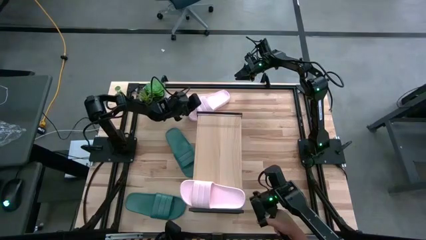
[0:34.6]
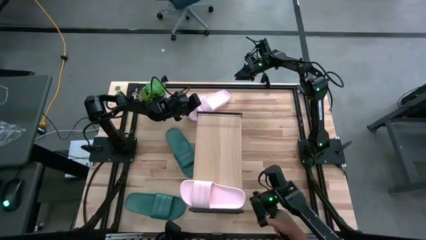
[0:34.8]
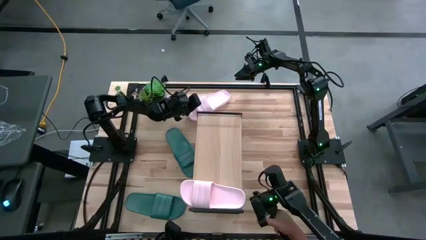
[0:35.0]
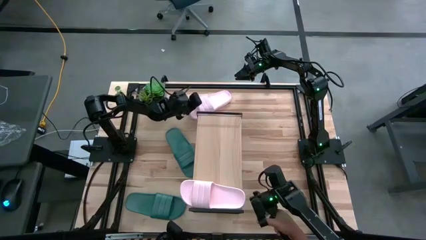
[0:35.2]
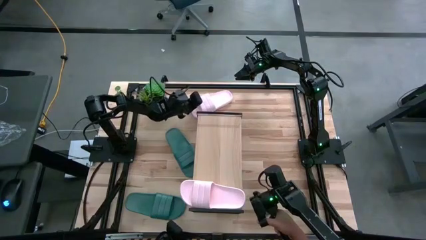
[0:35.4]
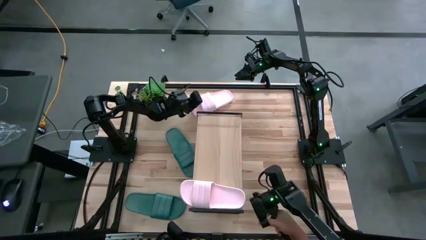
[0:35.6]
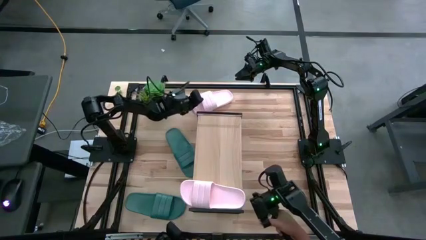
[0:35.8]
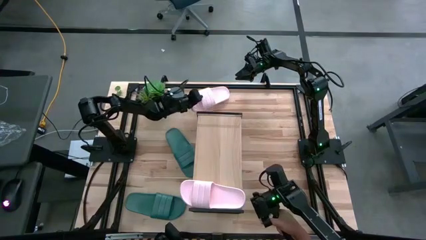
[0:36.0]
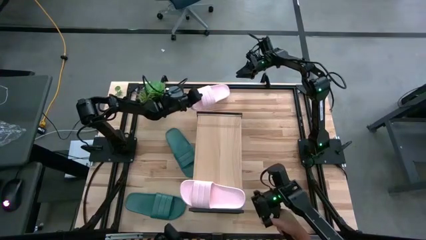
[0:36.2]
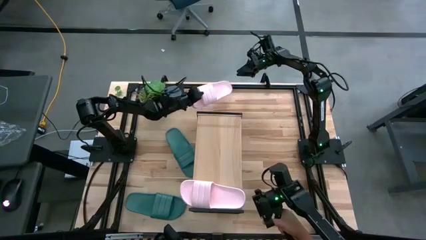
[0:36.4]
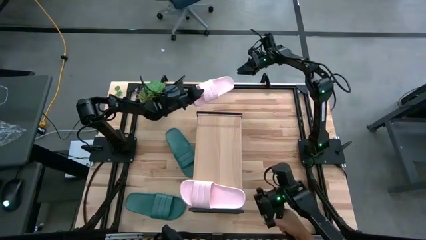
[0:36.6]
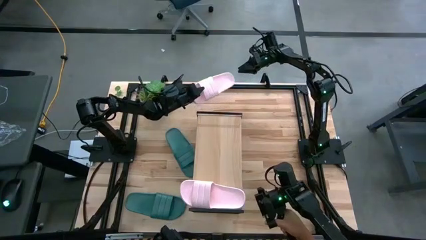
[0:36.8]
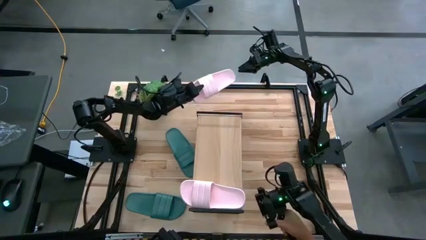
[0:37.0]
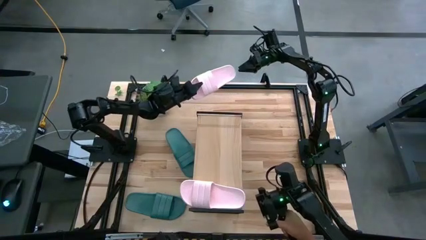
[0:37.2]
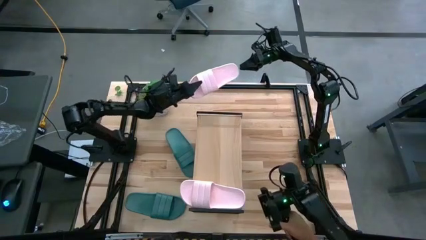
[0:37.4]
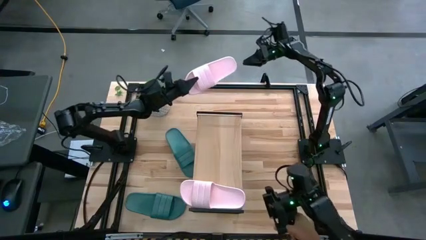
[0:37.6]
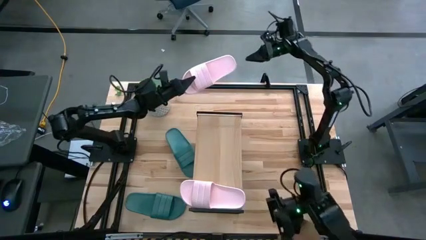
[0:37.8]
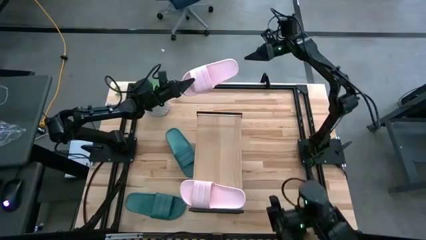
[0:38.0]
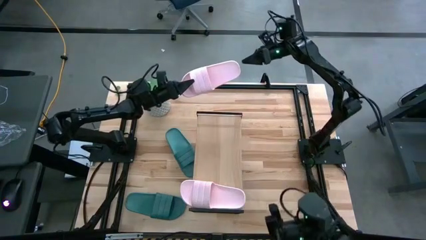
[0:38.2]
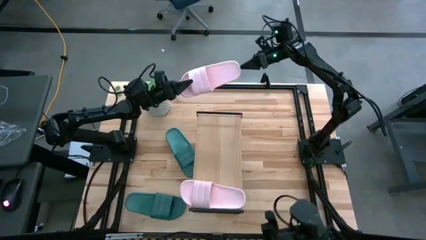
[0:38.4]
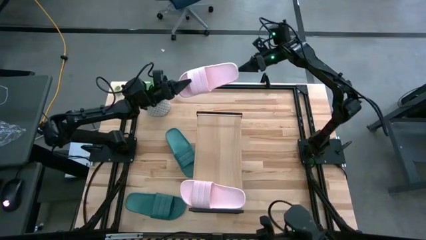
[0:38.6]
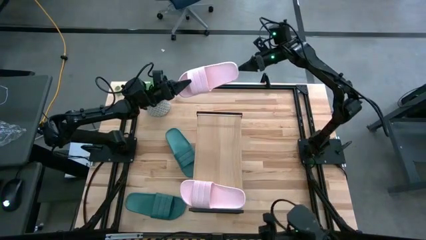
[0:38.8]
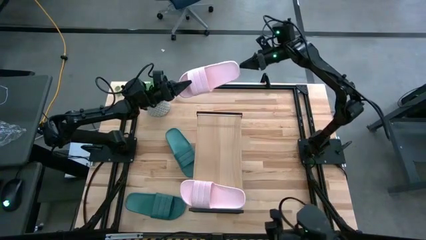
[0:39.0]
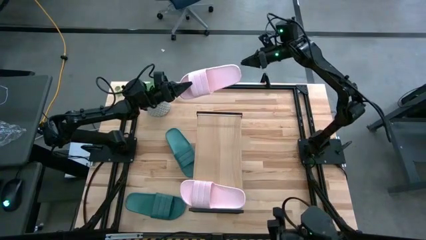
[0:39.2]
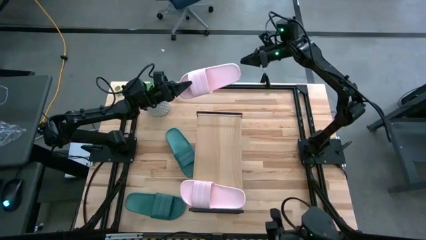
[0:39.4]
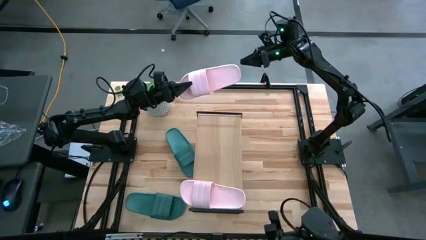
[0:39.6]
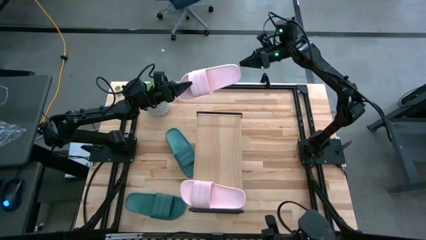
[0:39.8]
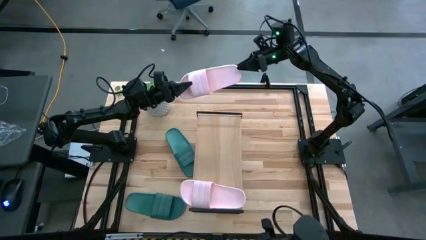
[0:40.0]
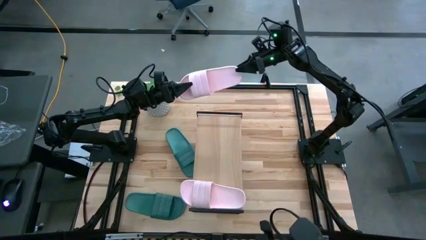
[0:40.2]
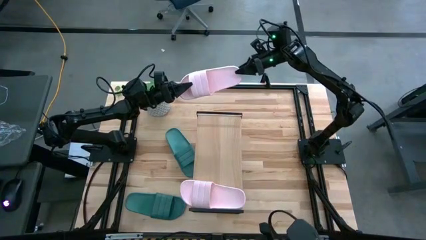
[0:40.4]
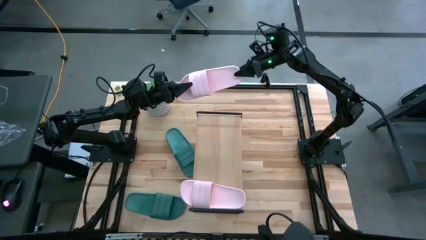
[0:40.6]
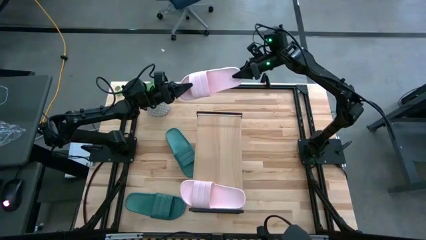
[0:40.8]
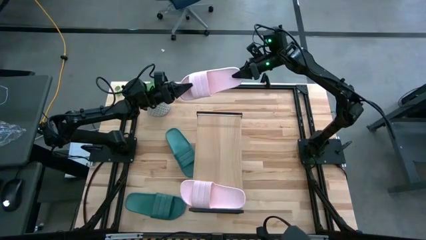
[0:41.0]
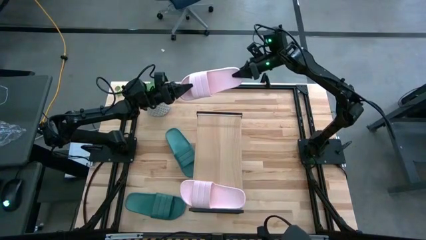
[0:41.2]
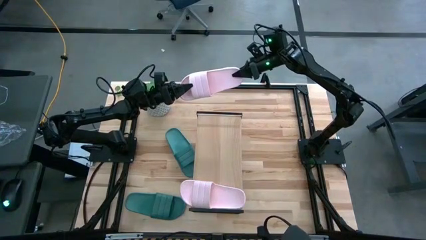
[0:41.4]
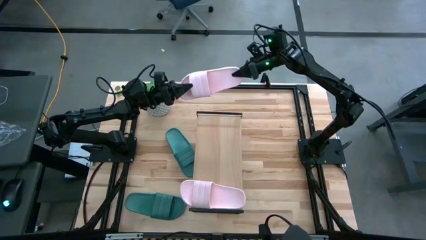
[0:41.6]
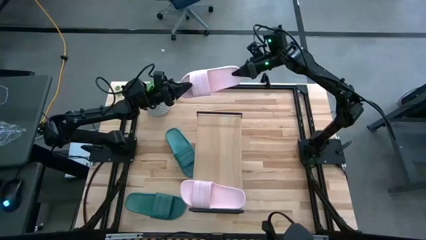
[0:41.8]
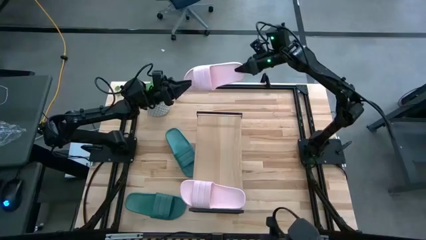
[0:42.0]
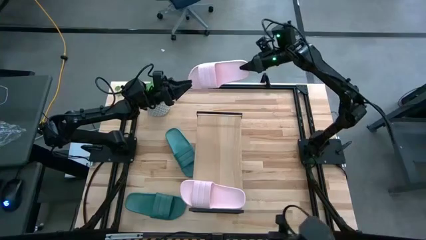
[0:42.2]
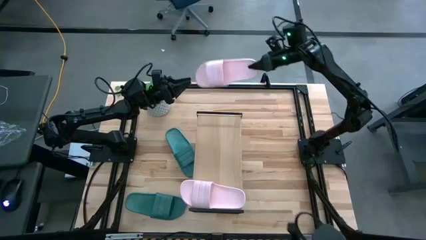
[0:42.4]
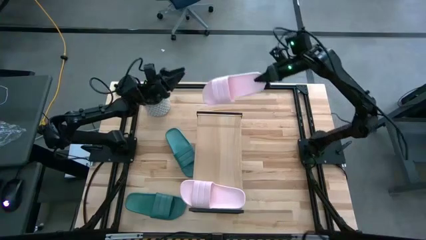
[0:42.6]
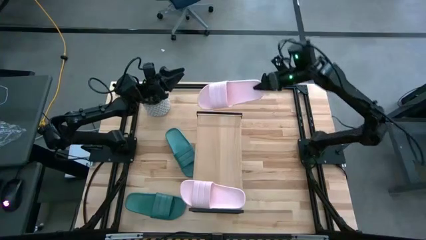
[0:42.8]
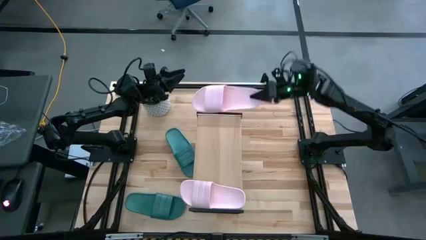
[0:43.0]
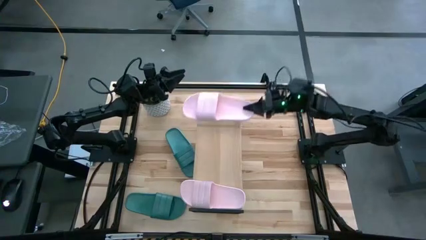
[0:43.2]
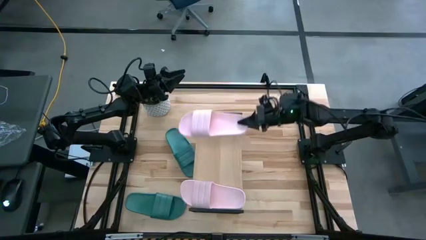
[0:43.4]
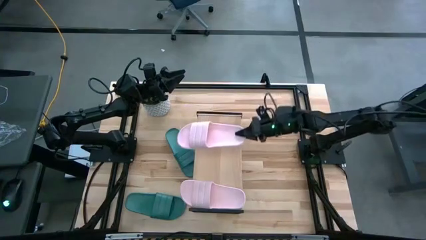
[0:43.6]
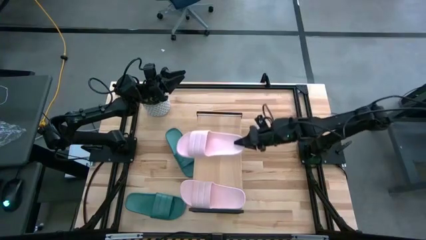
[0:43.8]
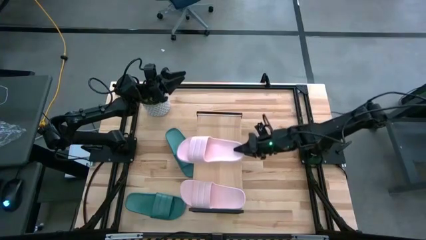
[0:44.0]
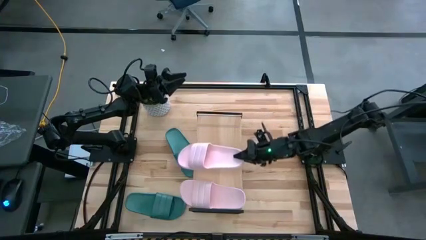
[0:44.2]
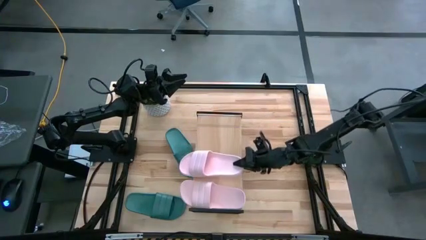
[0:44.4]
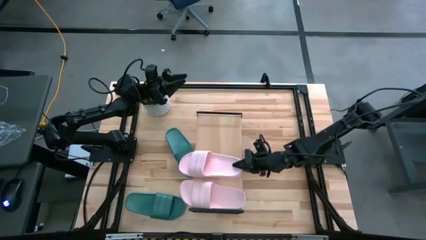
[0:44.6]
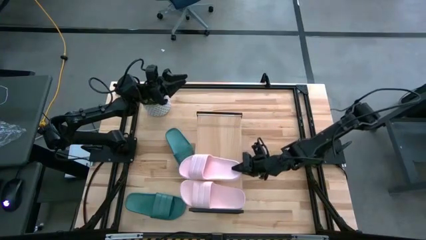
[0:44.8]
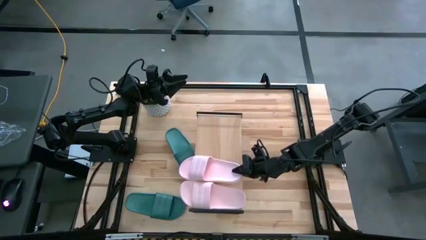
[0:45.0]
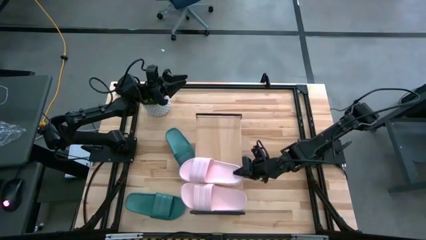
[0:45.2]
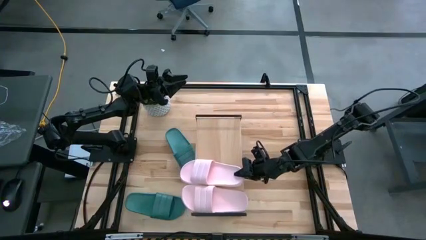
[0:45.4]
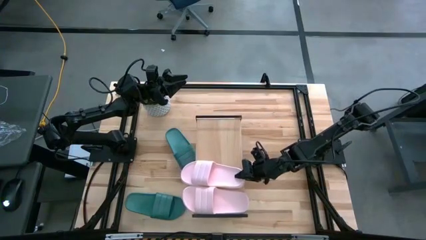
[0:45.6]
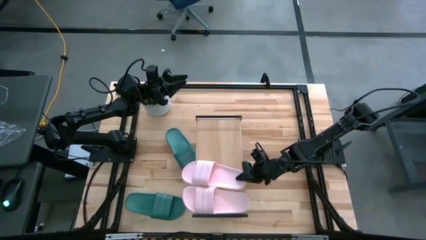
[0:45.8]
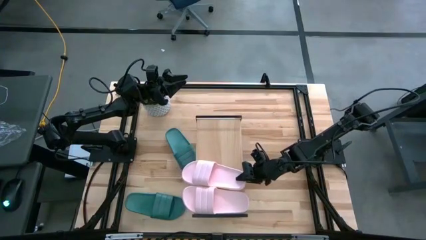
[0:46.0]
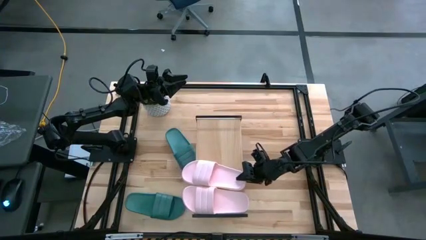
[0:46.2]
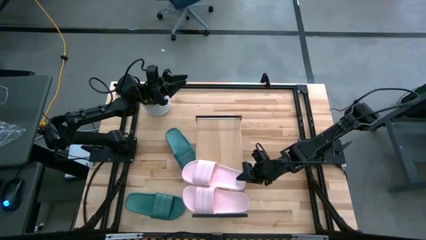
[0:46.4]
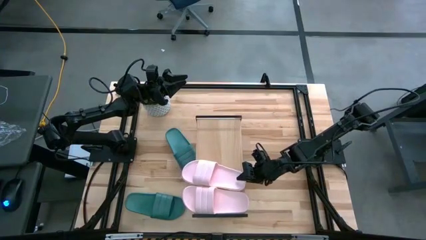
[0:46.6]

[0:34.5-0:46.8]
Task: Pick and place slides into the shelf
Put the pink slides on the shelf
